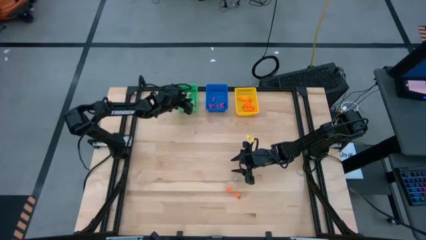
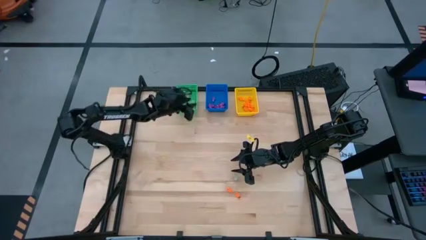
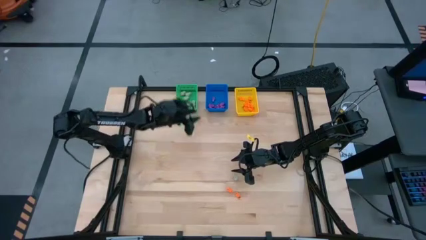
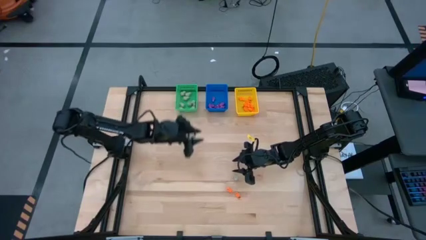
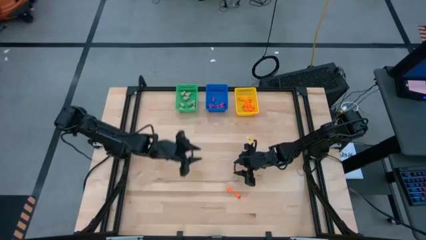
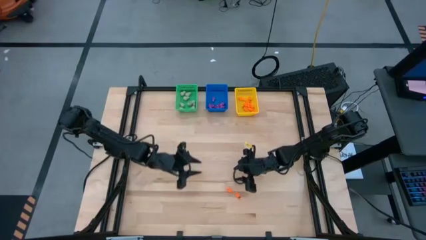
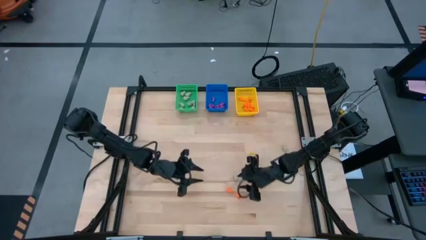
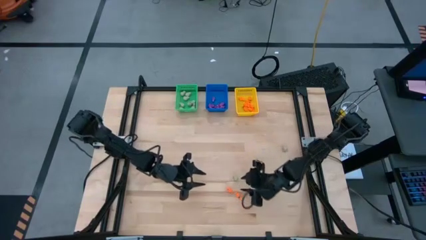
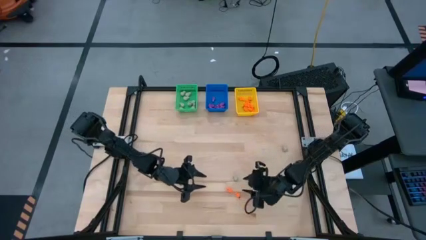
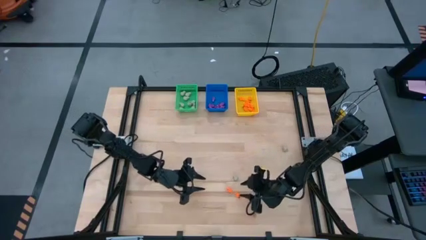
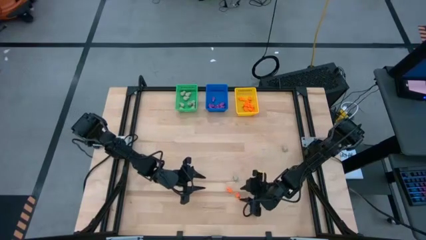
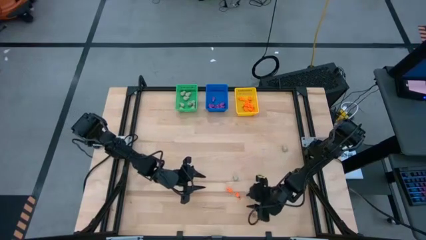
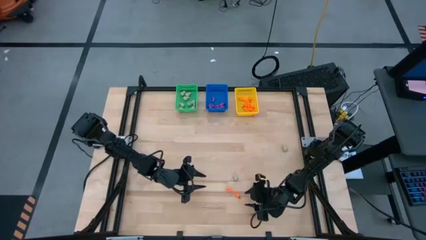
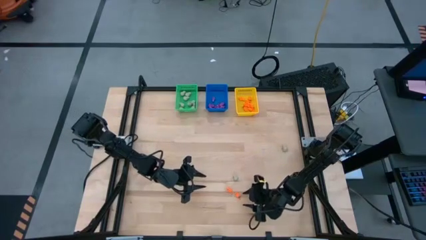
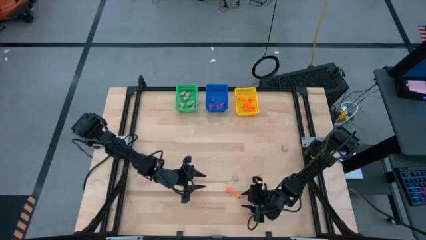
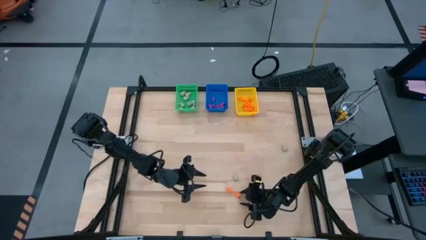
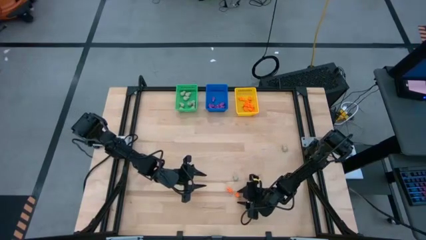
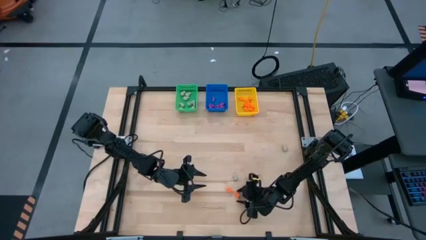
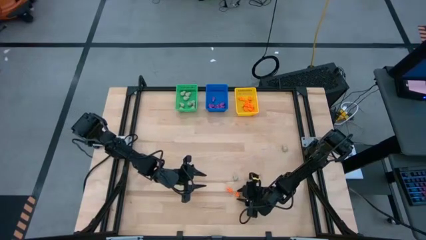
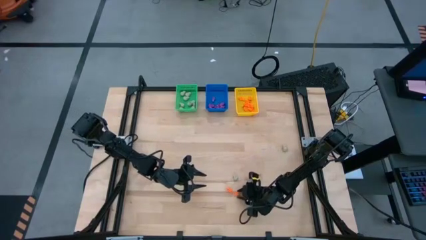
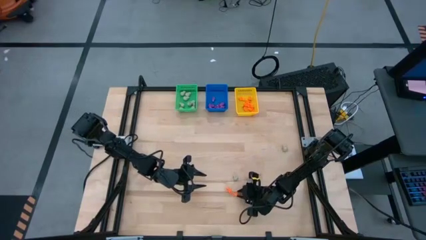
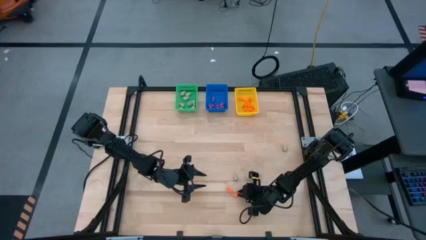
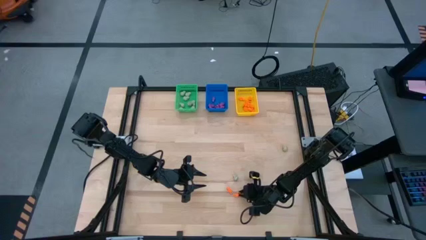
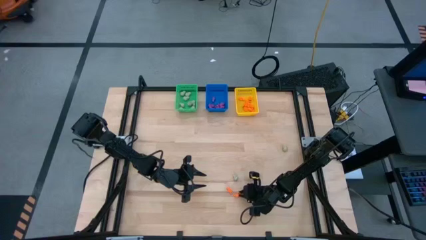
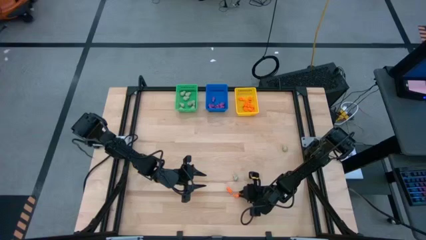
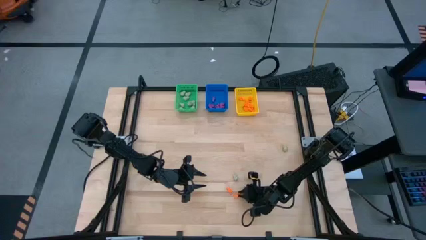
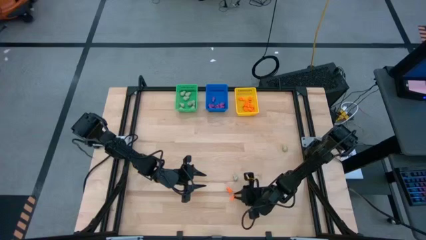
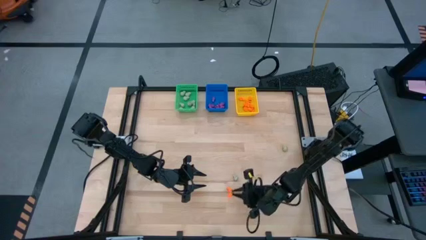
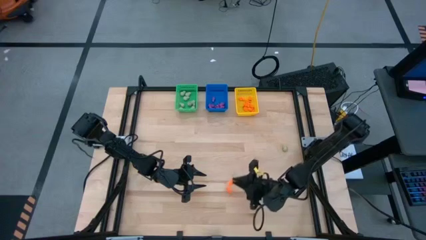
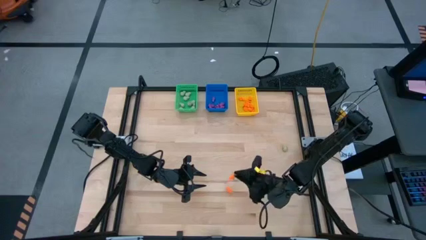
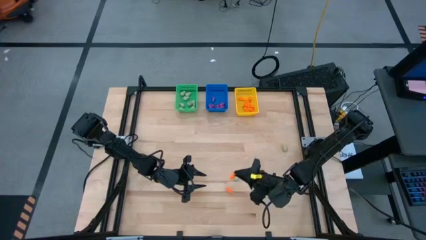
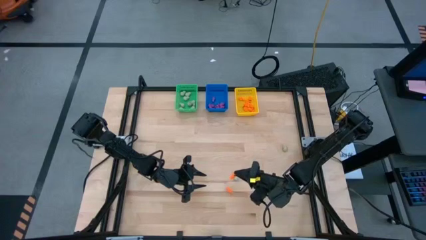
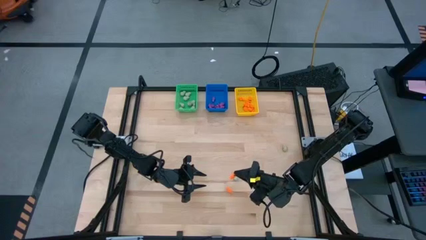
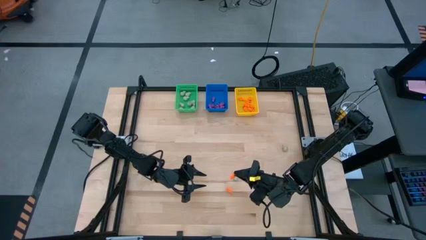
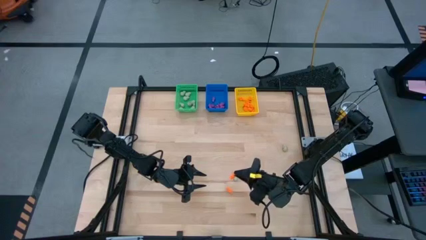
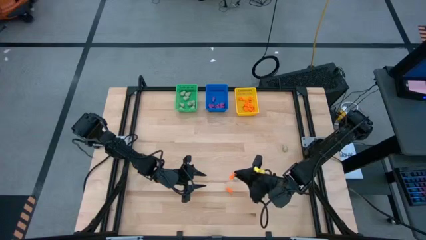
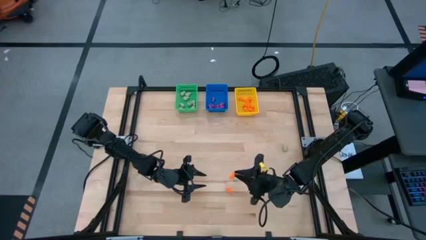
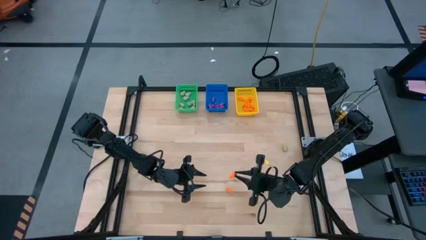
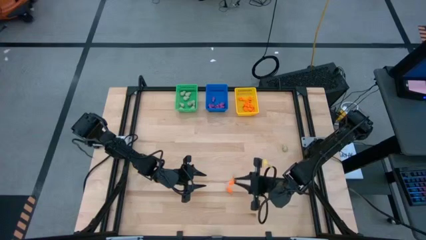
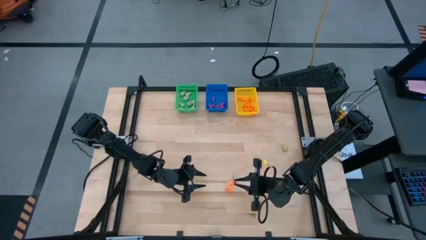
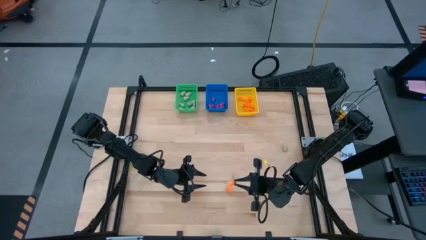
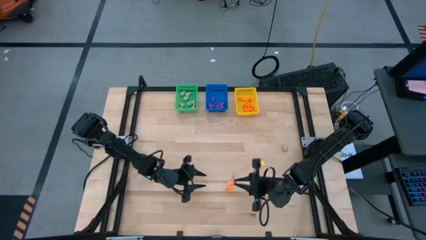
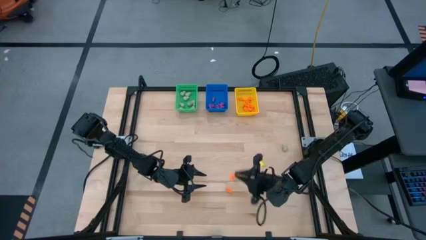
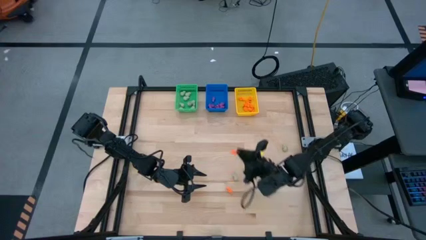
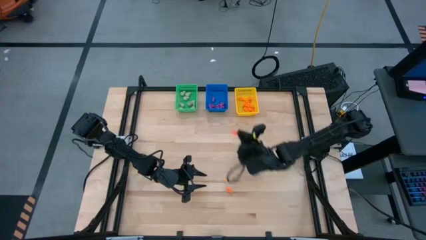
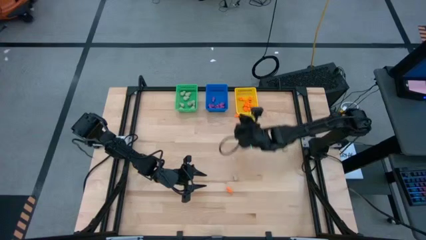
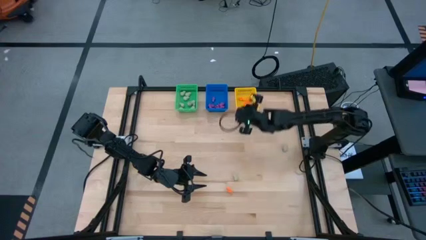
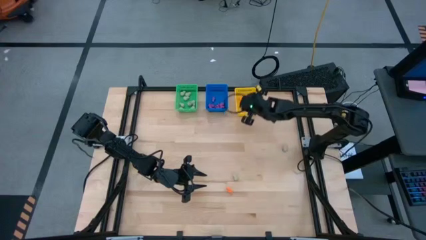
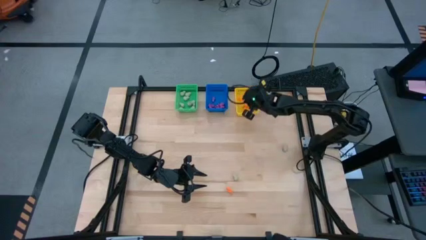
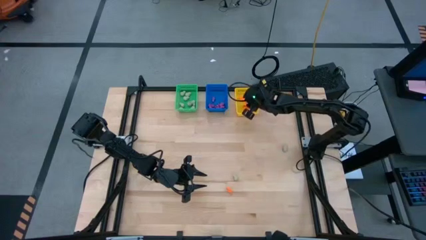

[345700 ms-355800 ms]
Task: Sort Halloween decoration
Put the orange skeleton toy into the yellow bin

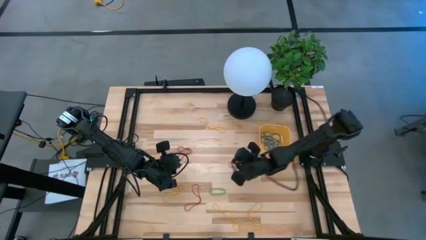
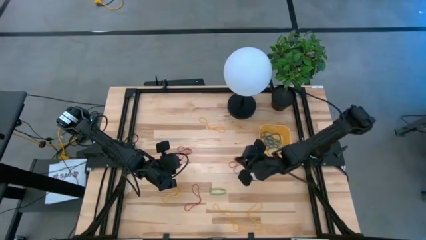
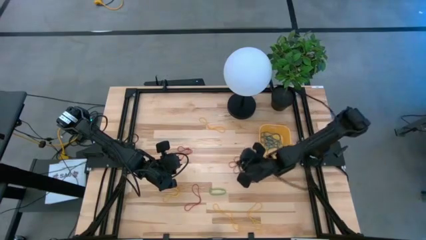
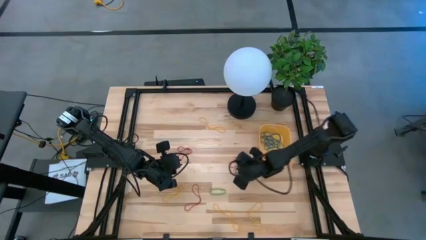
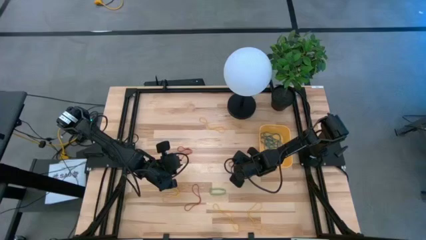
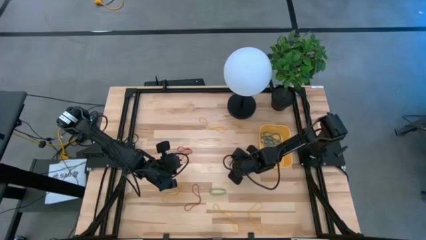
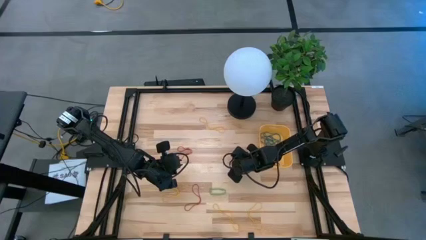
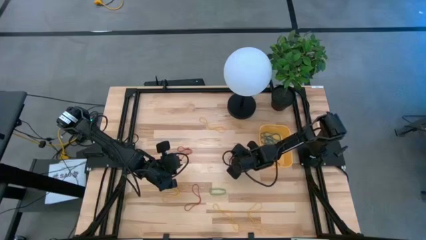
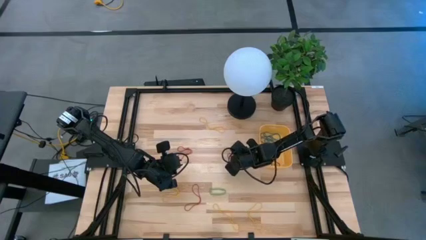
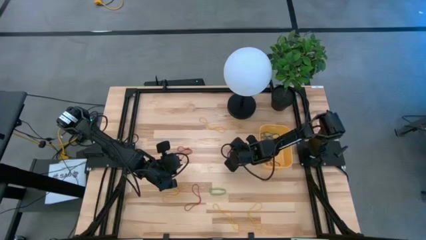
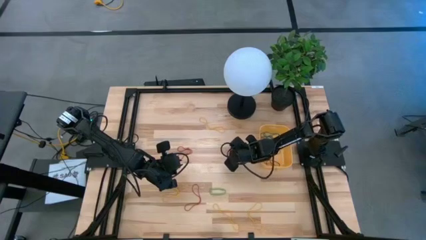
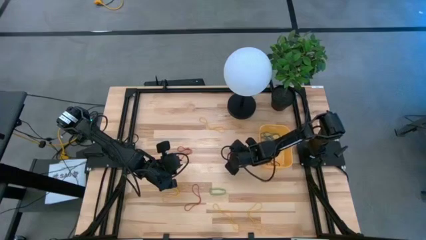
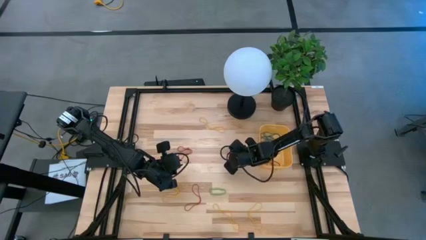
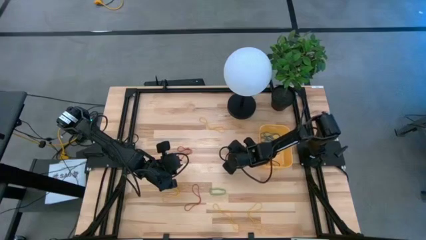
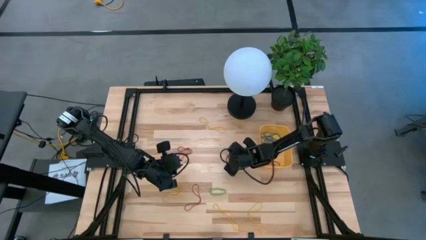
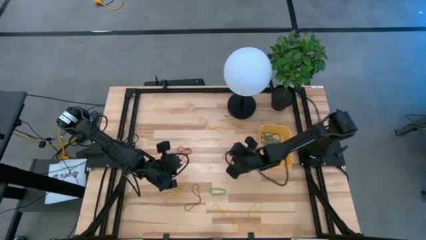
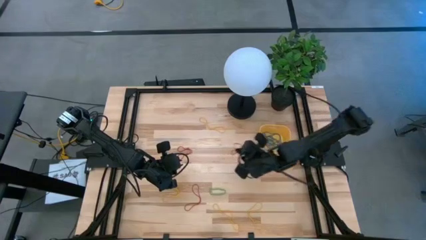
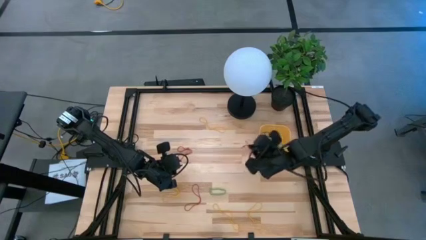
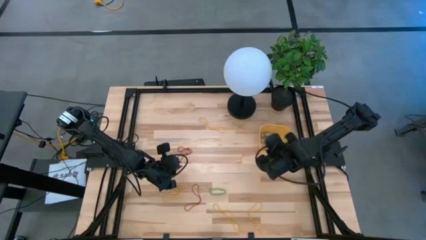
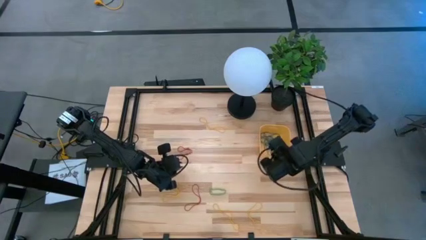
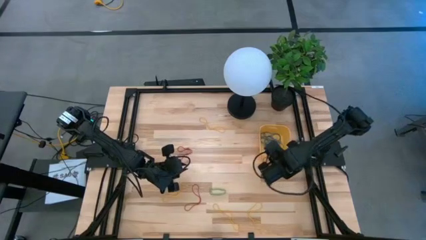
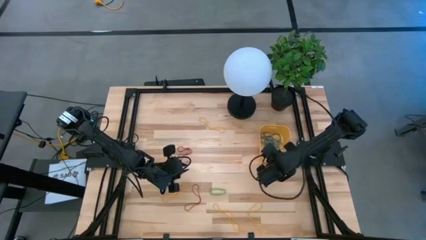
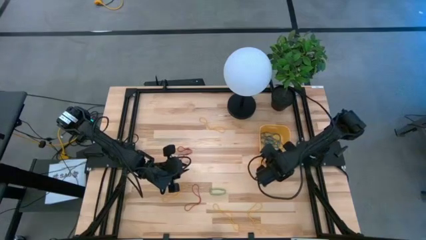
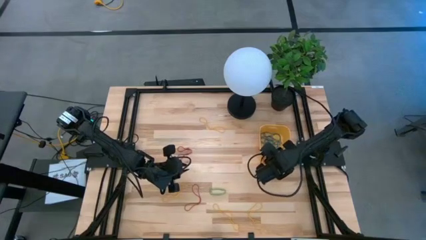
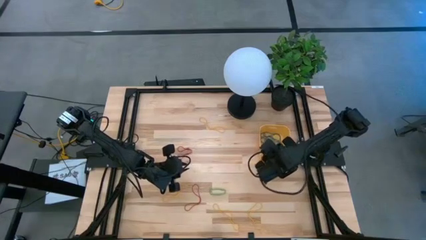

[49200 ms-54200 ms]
Task: Pick and place items into bin
Put the red rubber band into the bin

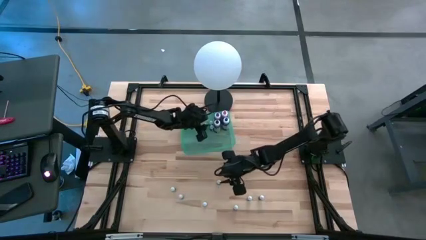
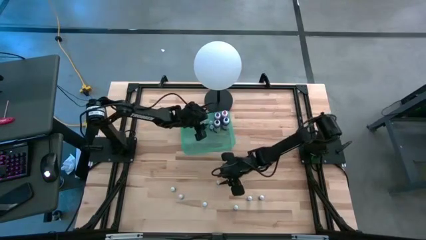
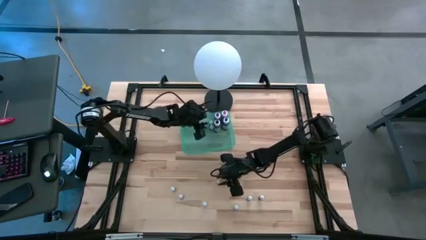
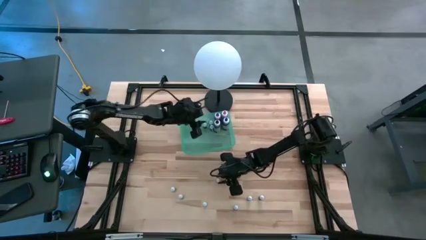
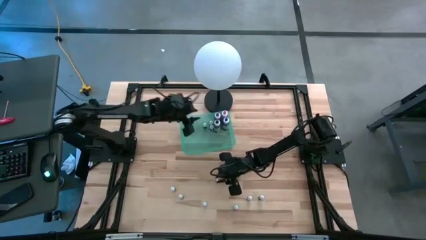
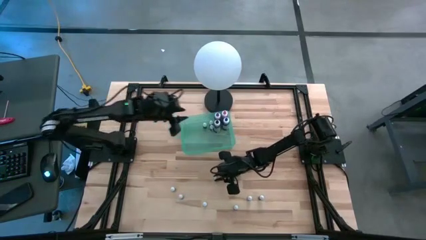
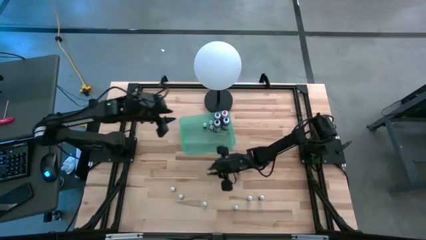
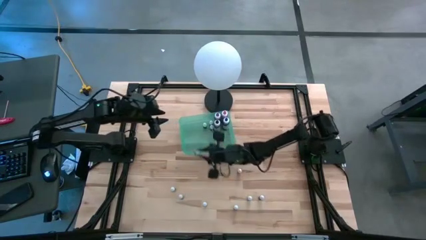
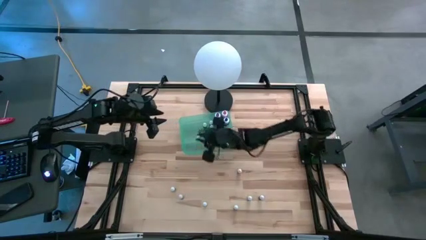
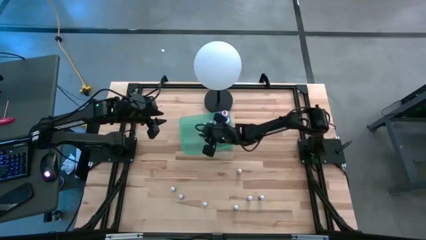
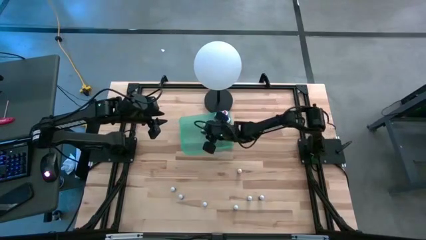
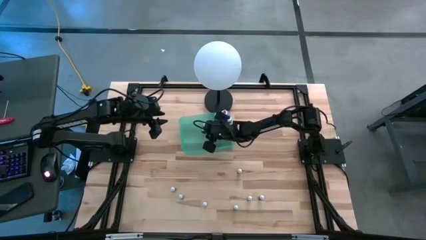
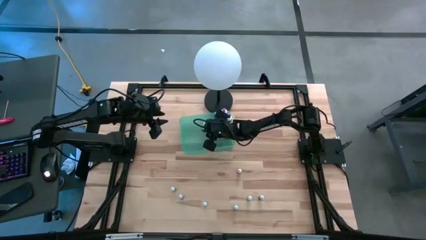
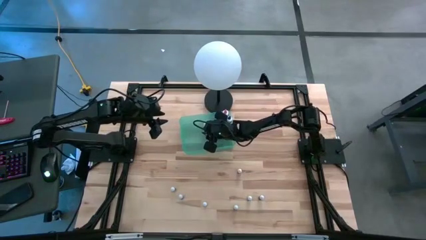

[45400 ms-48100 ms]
Task: Pick & Place food coloring
Put the small red food coloring bottle into the green bin
